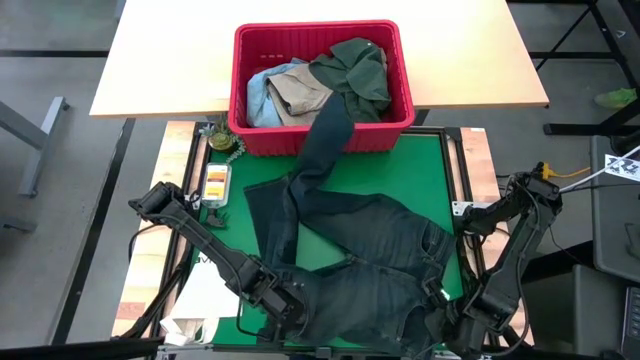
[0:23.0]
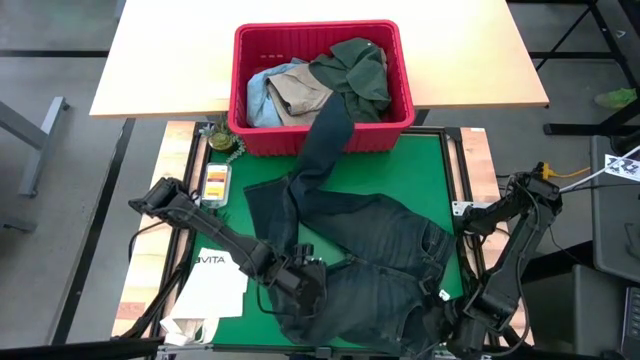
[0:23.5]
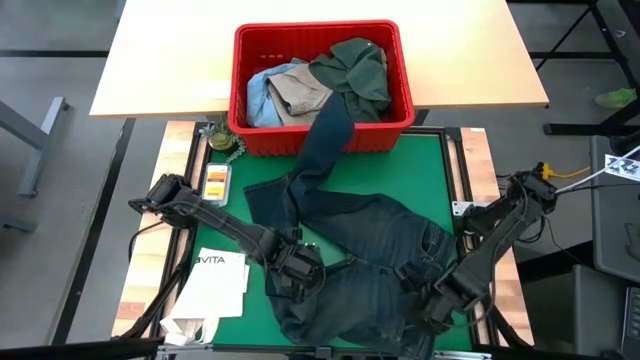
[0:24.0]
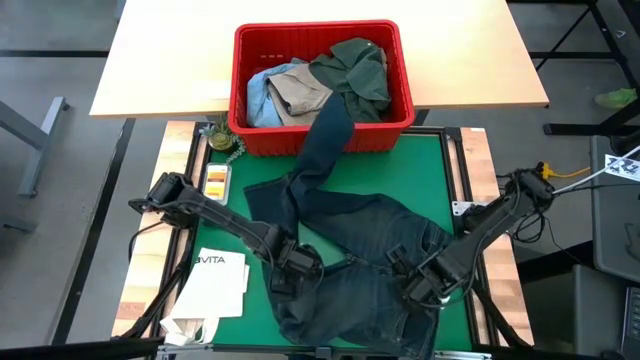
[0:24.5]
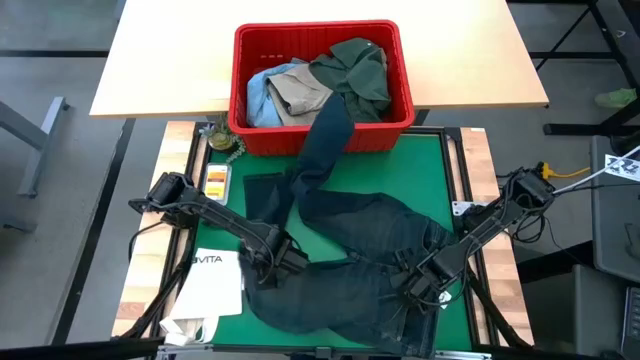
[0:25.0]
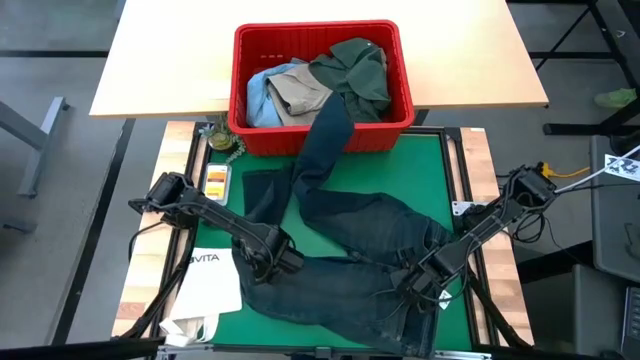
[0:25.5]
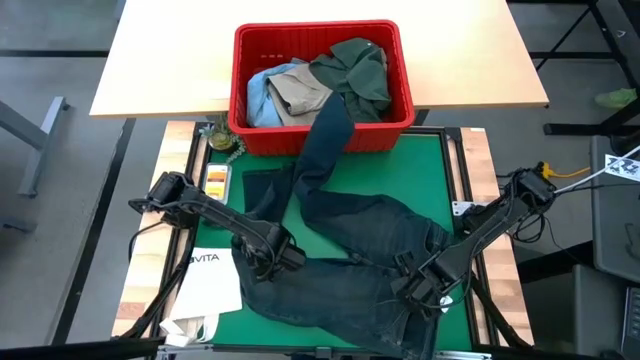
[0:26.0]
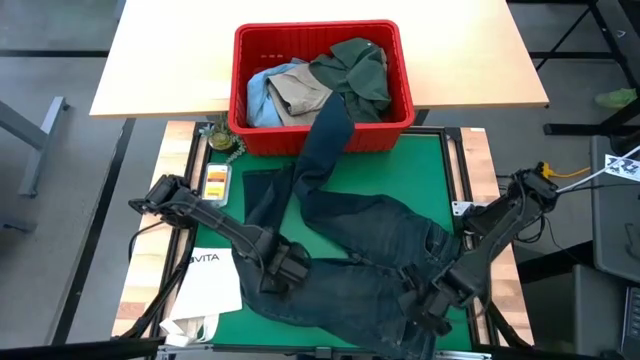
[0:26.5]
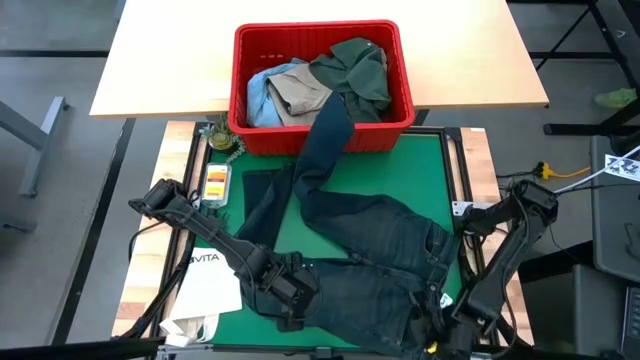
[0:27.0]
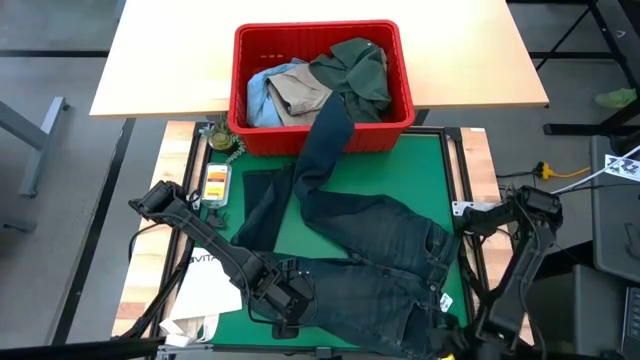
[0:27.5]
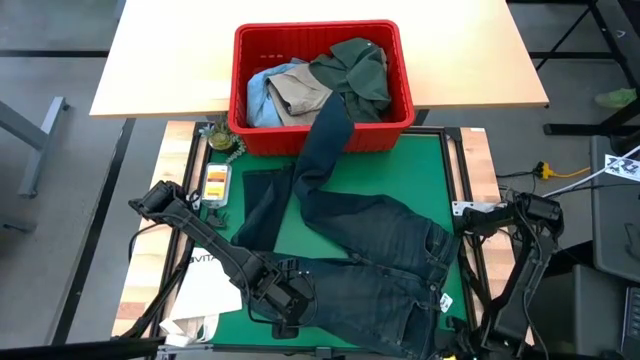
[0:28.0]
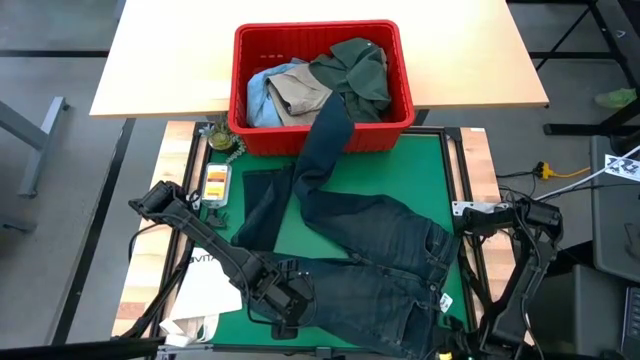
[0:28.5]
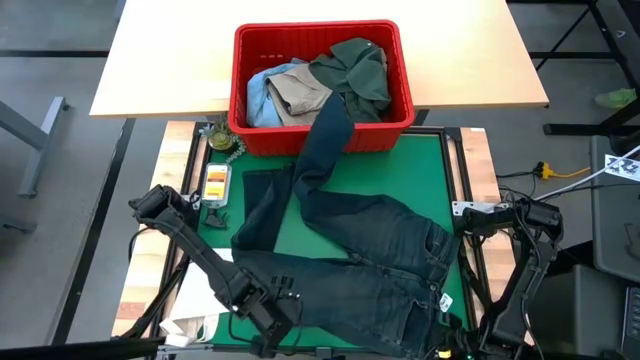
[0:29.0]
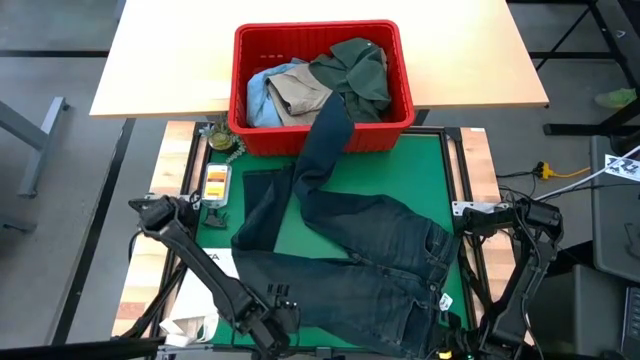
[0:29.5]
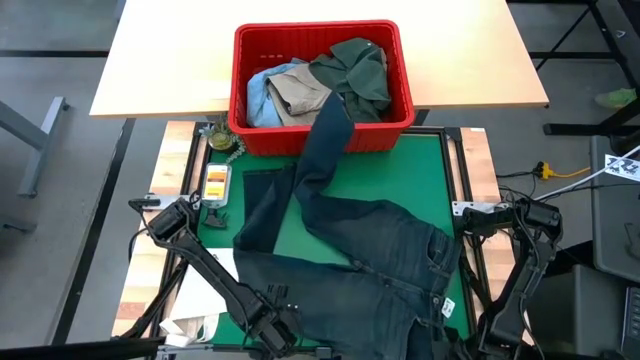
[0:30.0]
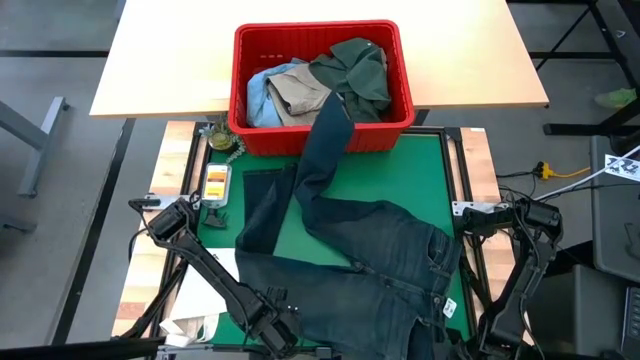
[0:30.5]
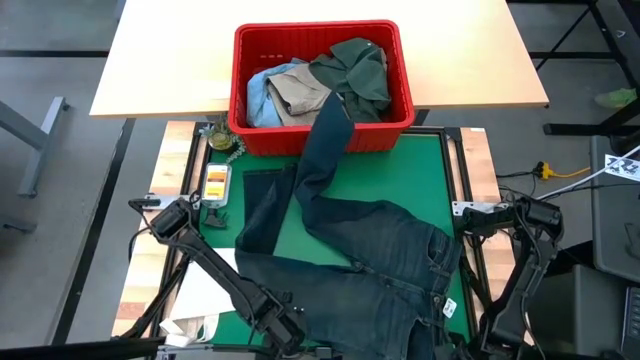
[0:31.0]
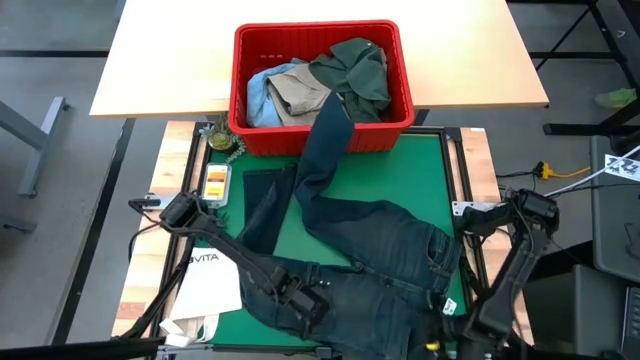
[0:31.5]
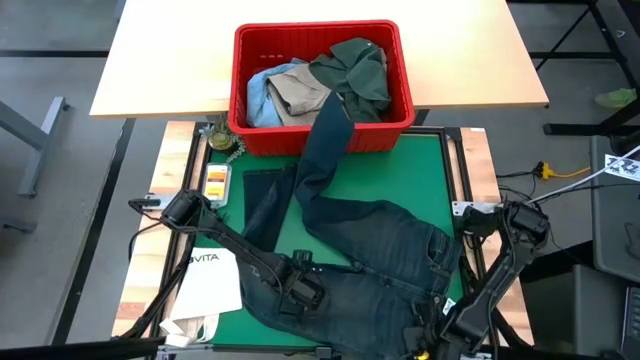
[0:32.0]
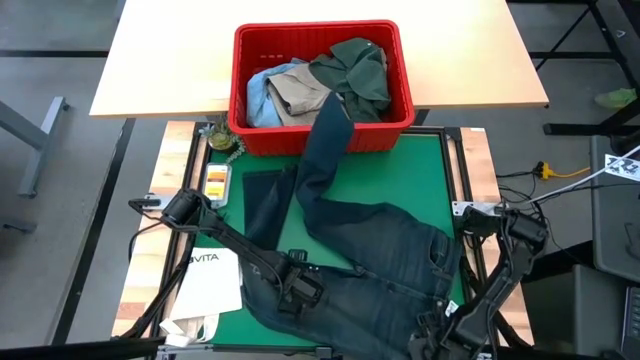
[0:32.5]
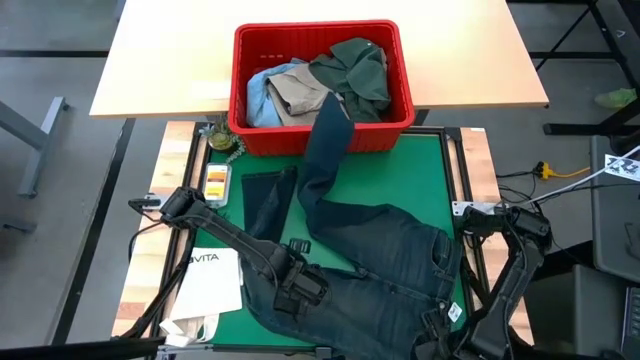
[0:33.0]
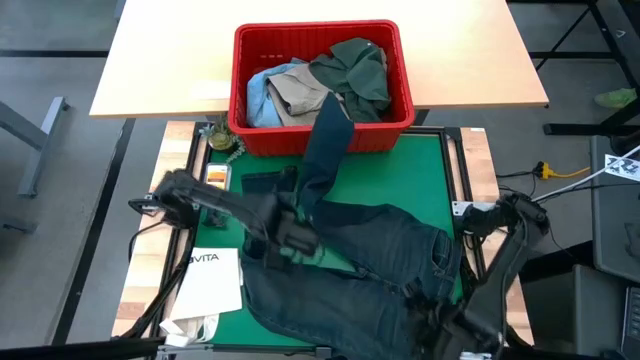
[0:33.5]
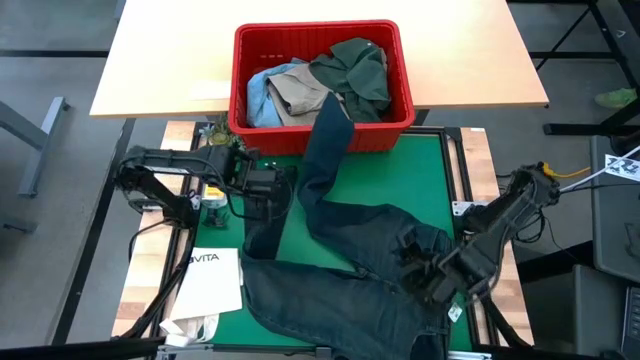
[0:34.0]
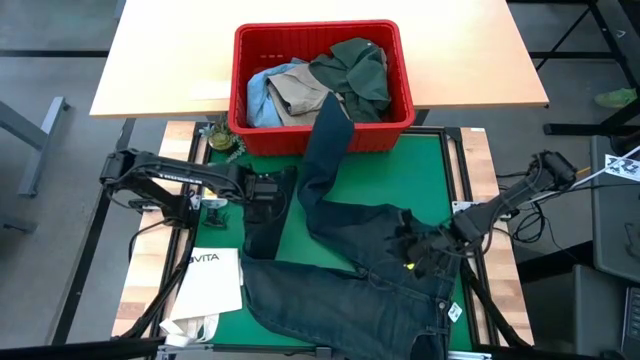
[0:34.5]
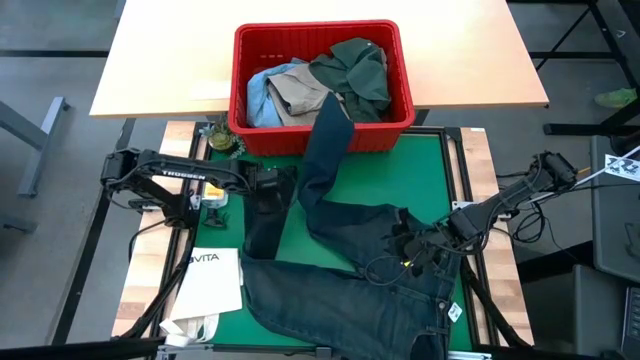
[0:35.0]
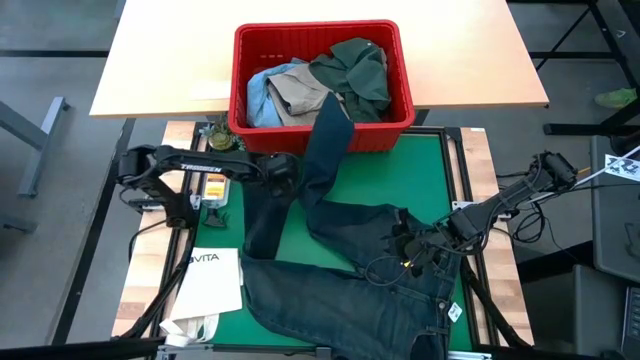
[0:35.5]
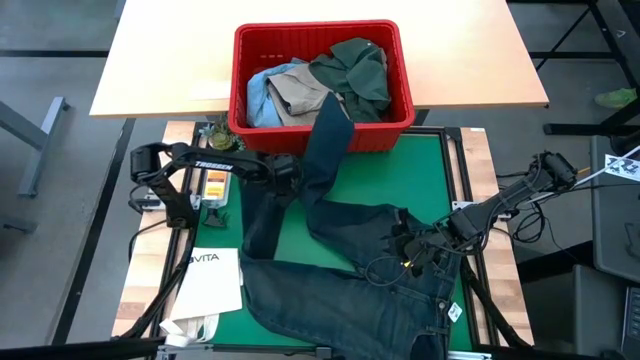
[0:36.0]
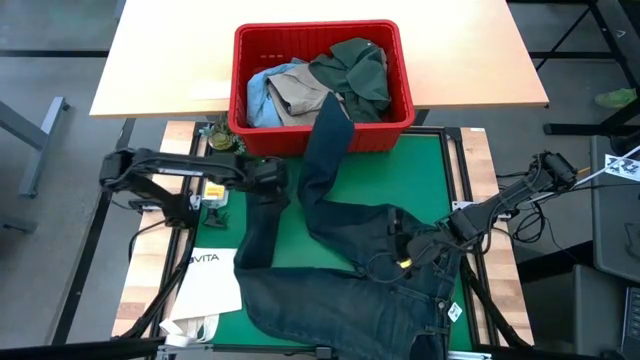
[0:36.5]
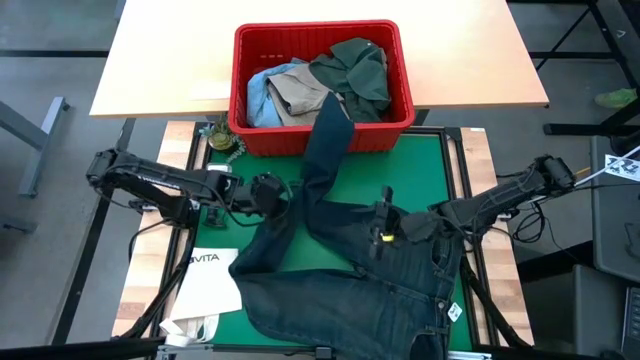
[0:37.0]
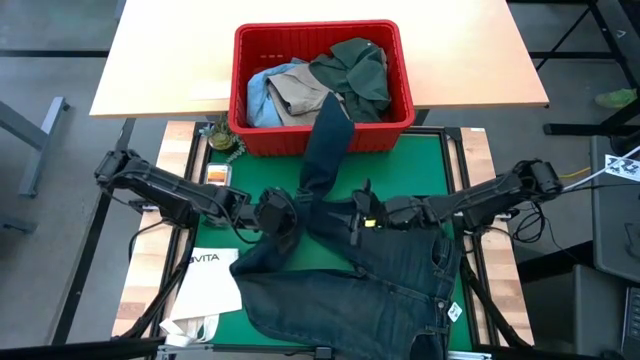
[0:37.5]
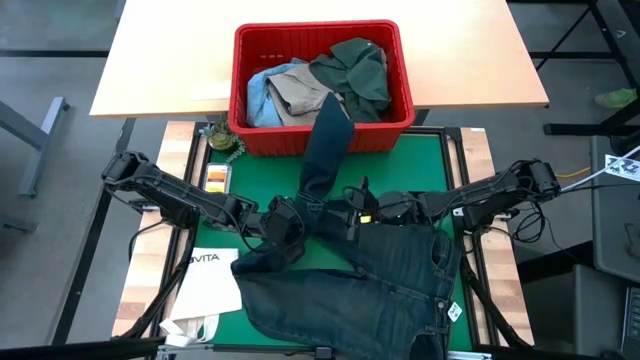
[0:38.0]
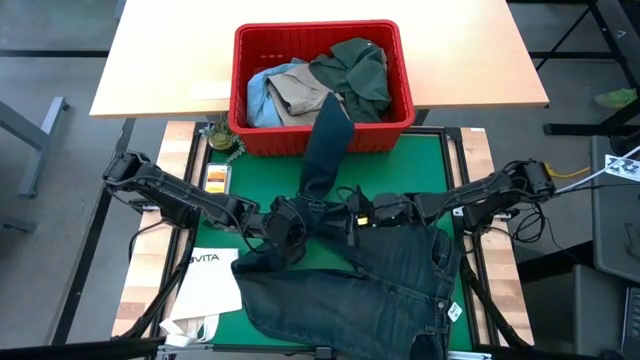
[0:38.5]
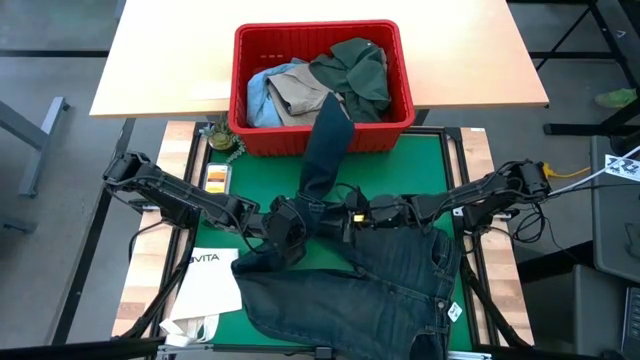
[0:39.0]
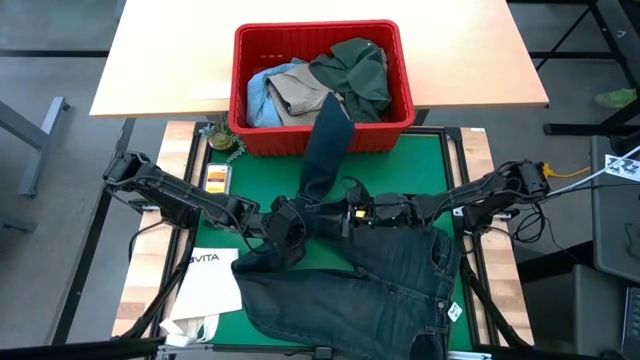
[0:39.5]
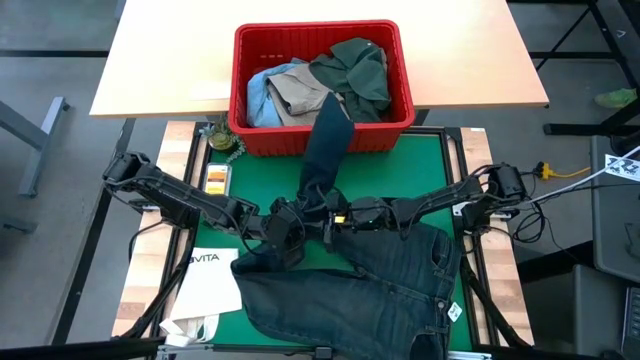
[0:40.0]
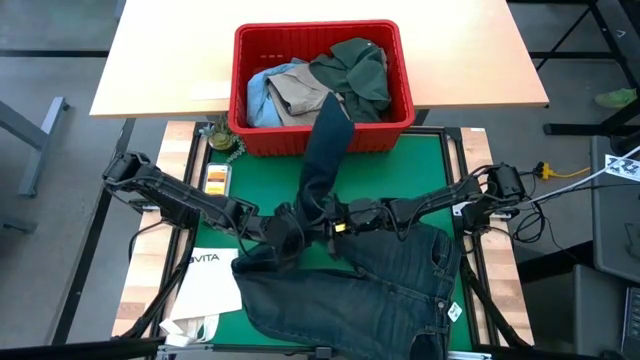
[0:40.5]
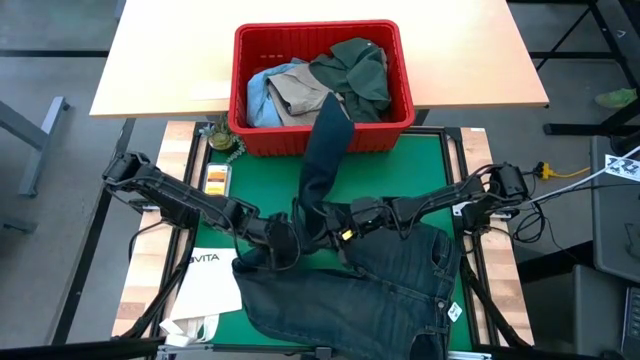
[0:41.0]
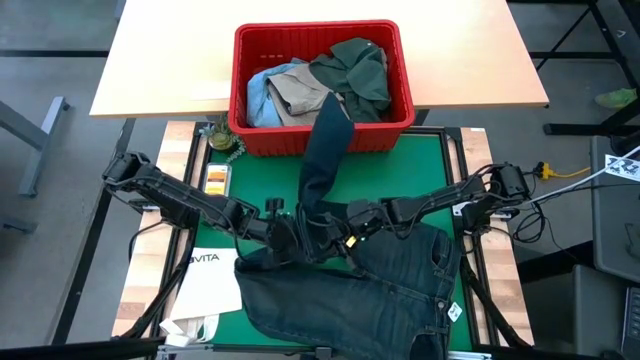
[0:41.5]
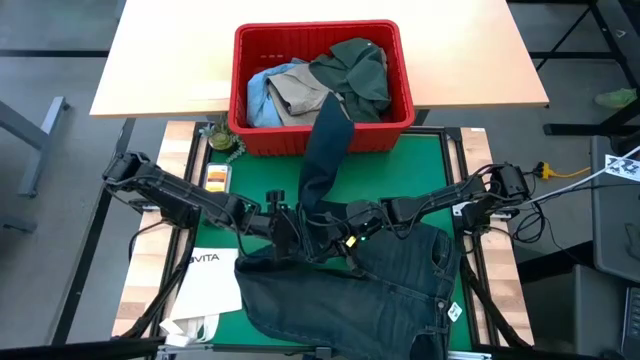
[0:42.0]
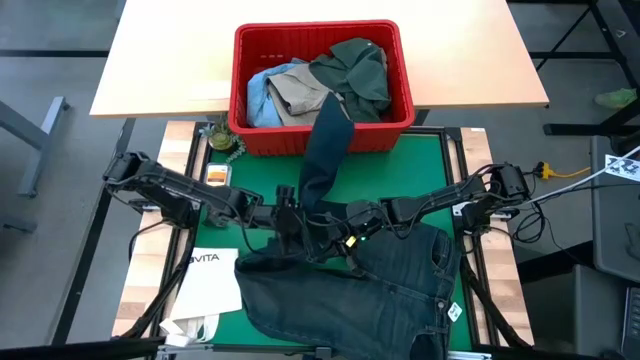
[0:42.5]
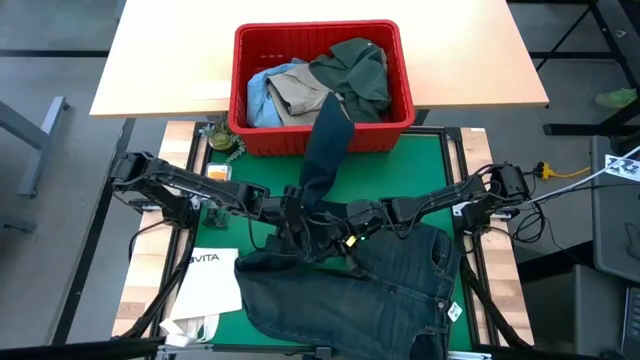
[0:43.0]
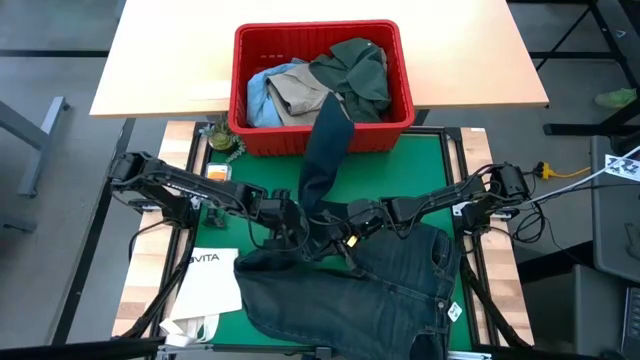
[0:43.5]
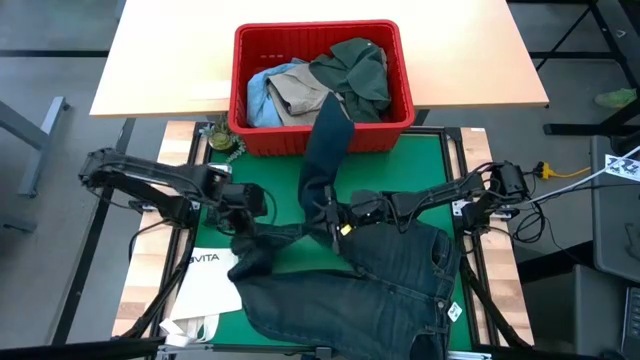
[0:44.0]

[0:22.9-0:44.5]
Task: Fold Laundry from Bin
Fold the dark blue pants

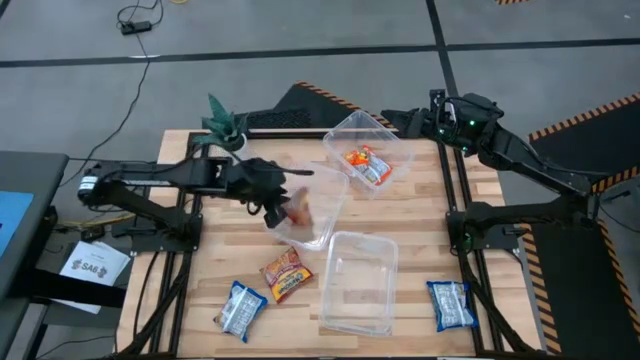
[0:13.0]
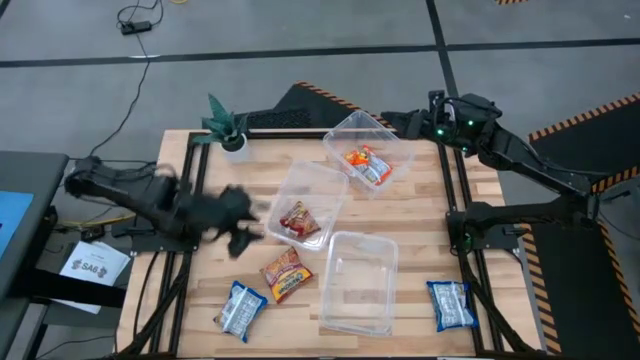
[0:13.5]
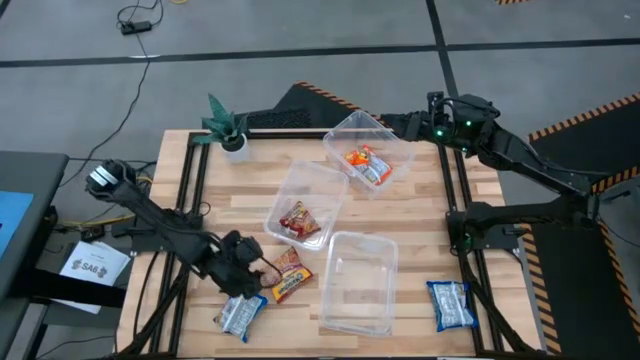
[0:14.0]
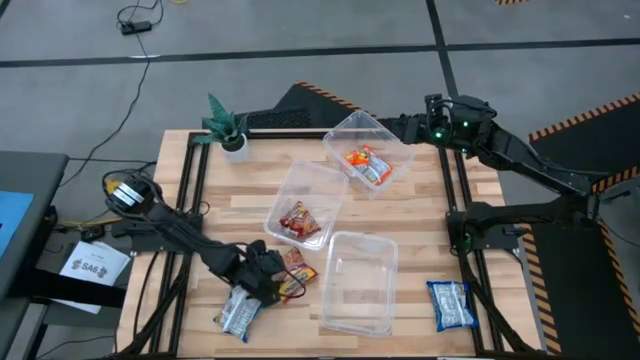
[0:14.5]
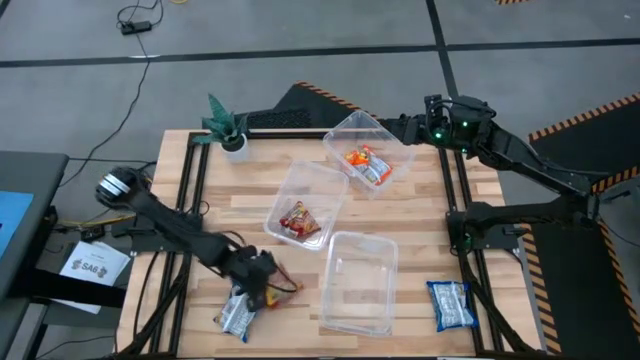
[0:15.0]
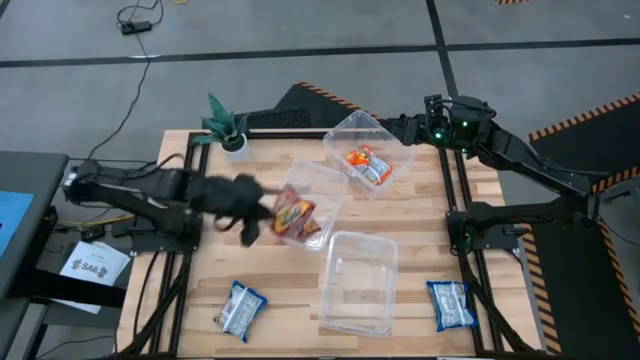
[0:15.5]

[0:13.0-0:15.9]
Task: Sort Maruchan noodles
Put the red noodle pack into the middle transparent bin
